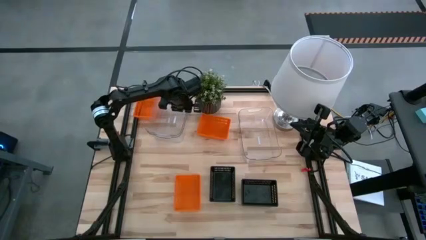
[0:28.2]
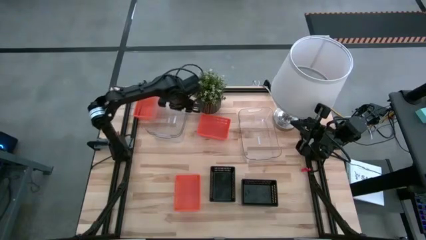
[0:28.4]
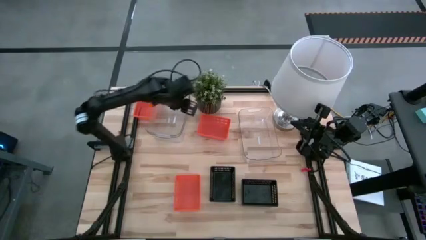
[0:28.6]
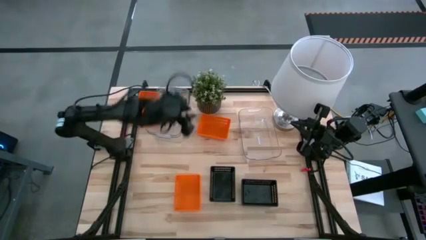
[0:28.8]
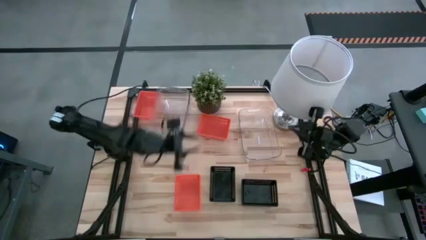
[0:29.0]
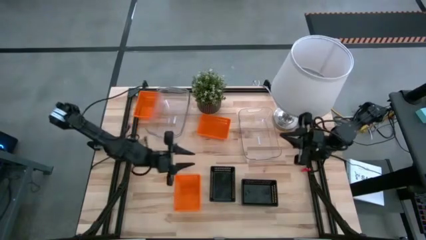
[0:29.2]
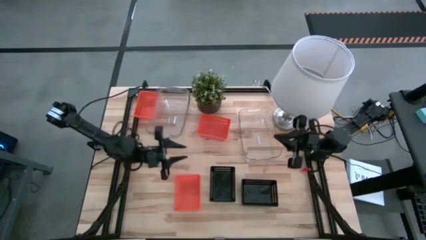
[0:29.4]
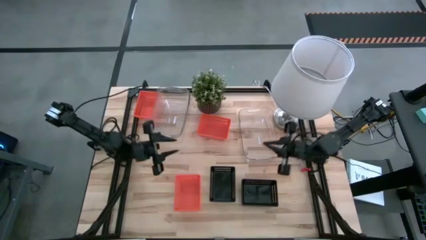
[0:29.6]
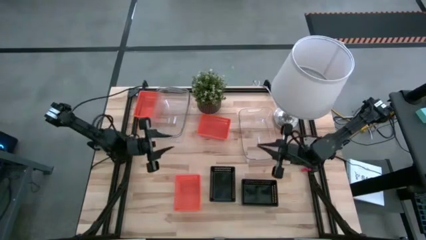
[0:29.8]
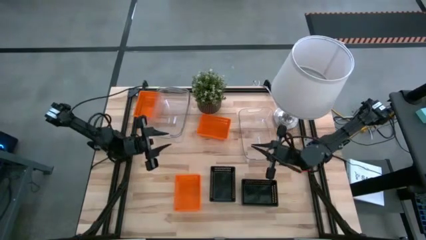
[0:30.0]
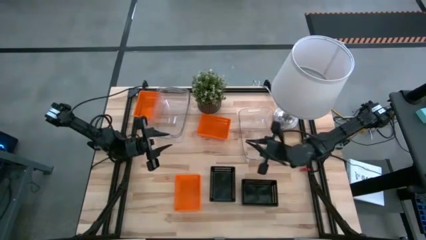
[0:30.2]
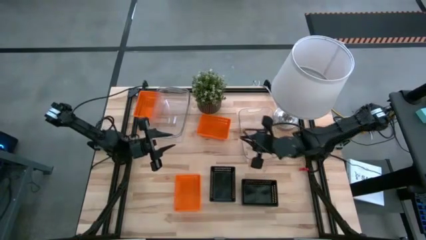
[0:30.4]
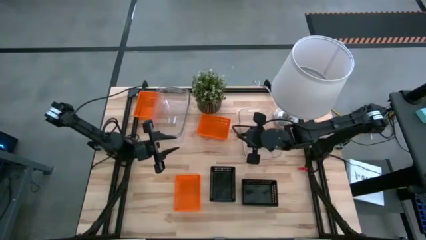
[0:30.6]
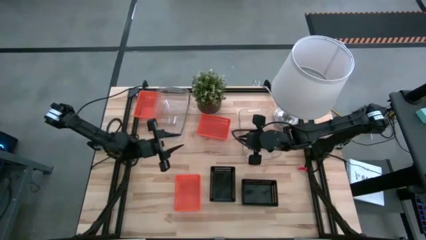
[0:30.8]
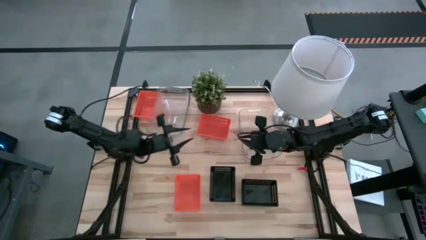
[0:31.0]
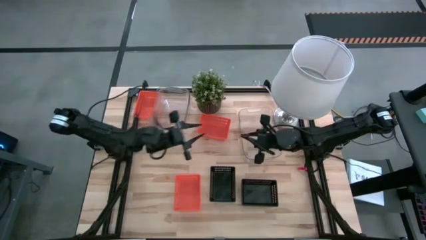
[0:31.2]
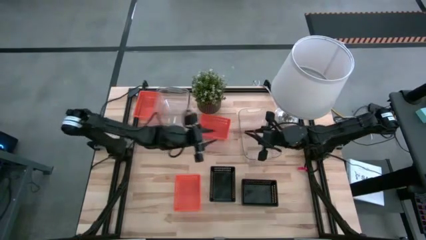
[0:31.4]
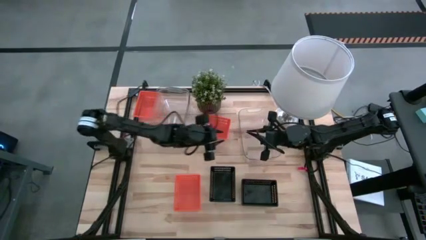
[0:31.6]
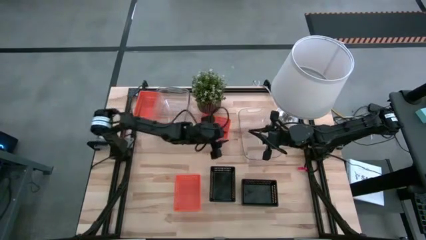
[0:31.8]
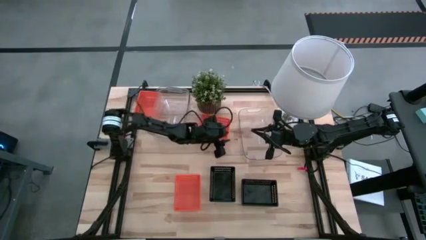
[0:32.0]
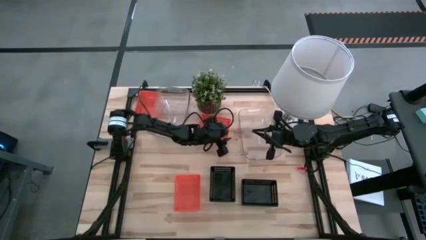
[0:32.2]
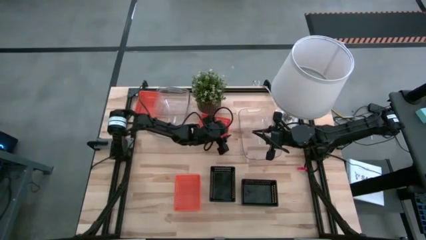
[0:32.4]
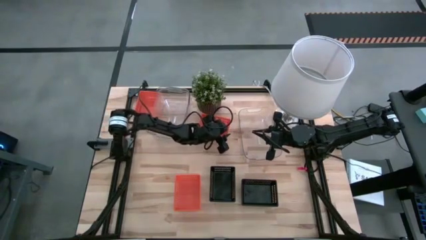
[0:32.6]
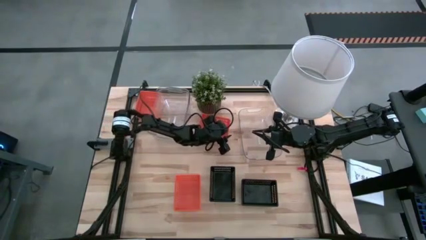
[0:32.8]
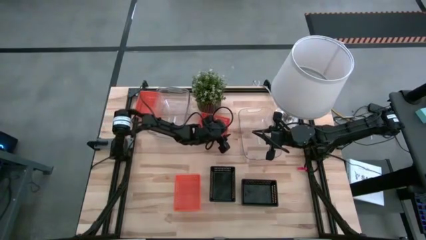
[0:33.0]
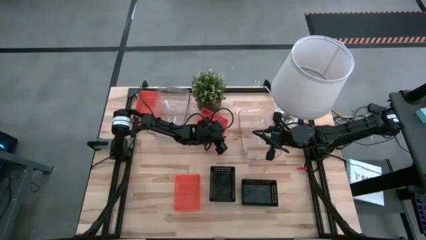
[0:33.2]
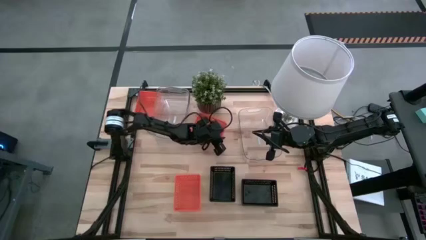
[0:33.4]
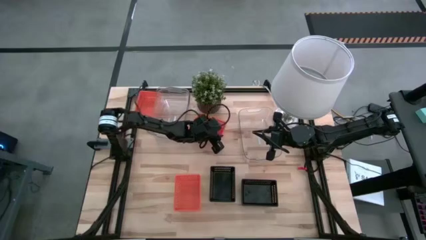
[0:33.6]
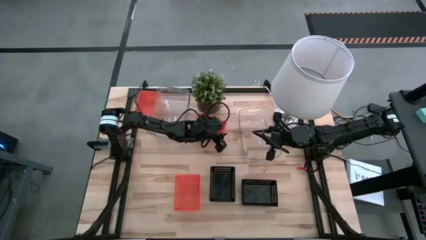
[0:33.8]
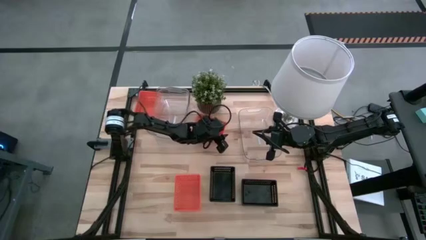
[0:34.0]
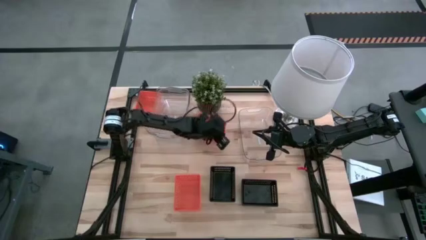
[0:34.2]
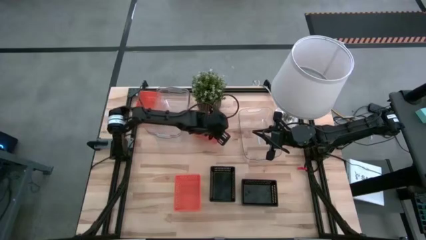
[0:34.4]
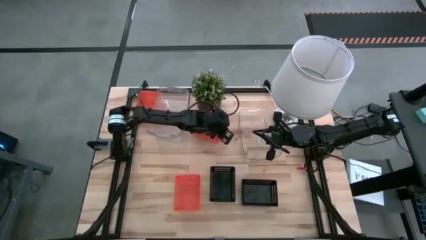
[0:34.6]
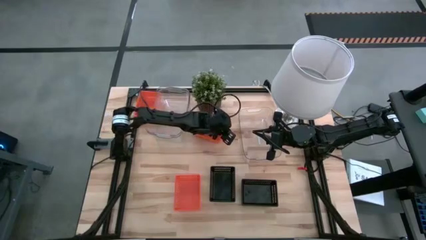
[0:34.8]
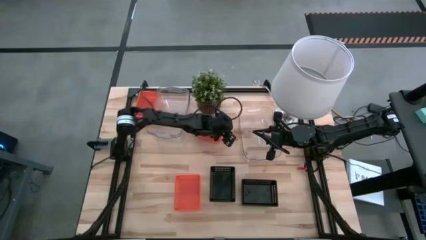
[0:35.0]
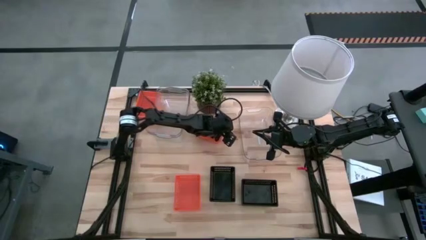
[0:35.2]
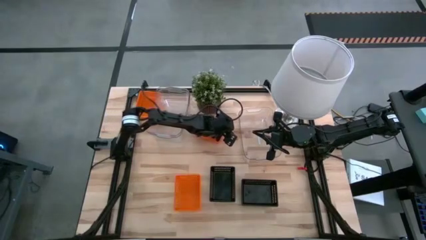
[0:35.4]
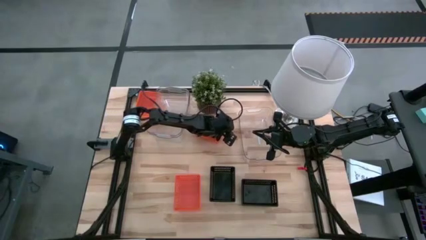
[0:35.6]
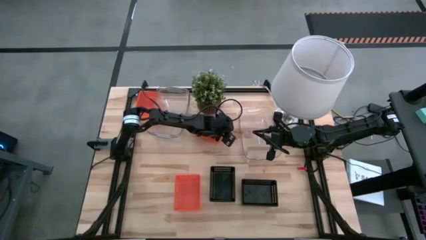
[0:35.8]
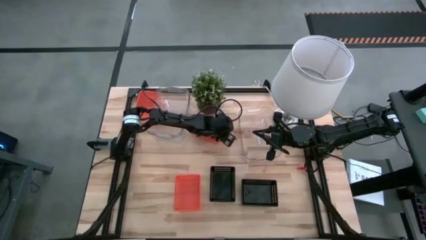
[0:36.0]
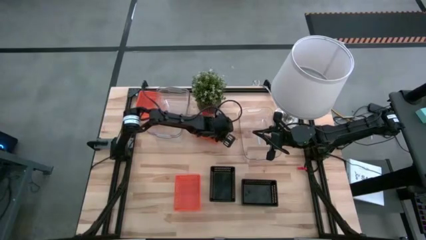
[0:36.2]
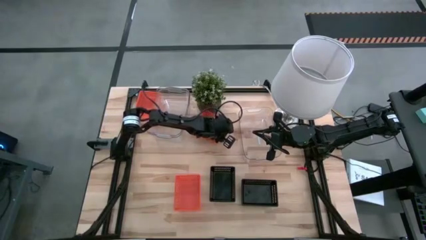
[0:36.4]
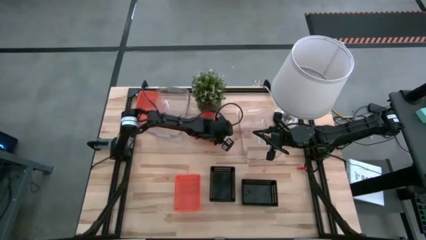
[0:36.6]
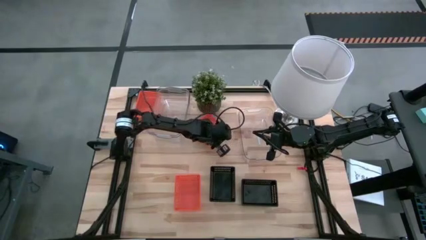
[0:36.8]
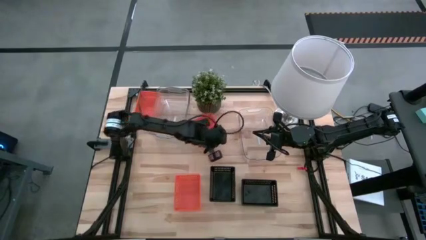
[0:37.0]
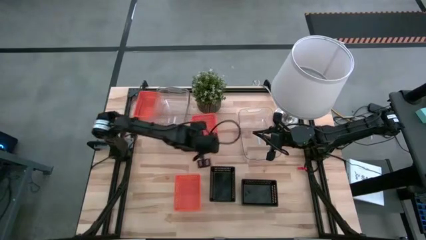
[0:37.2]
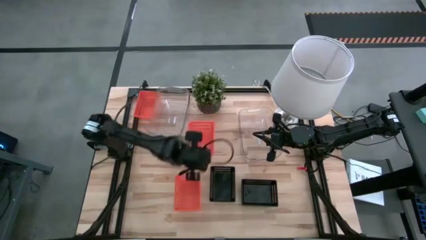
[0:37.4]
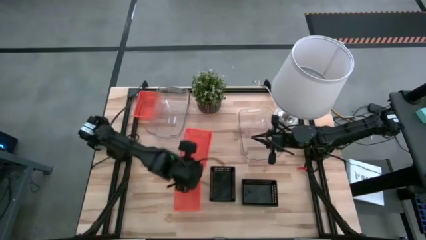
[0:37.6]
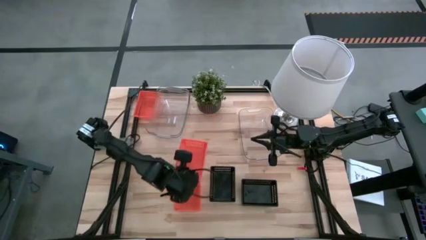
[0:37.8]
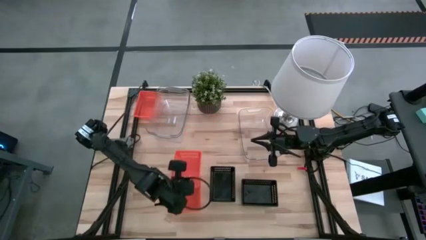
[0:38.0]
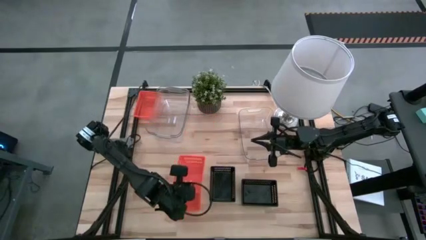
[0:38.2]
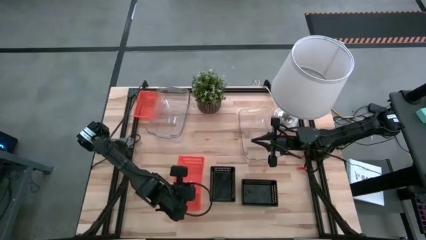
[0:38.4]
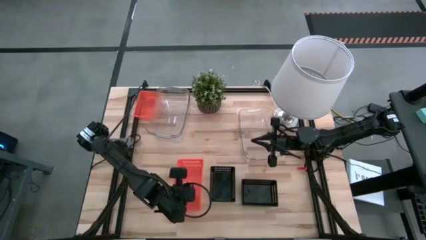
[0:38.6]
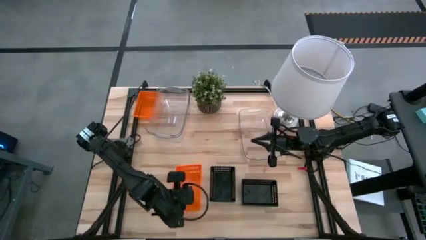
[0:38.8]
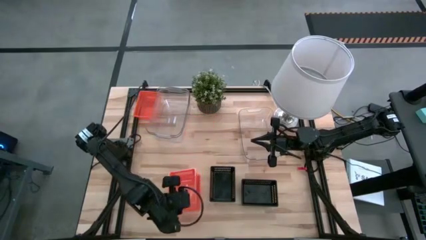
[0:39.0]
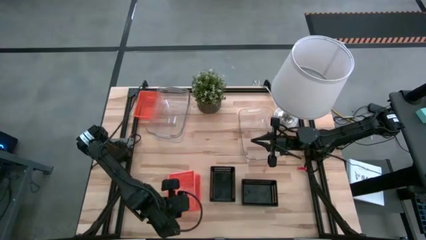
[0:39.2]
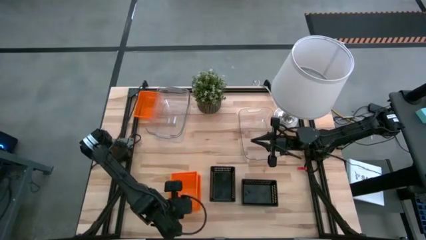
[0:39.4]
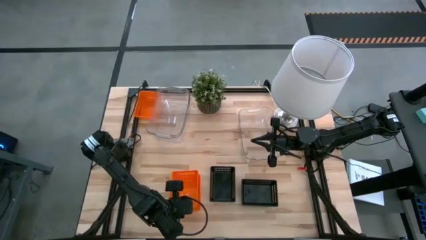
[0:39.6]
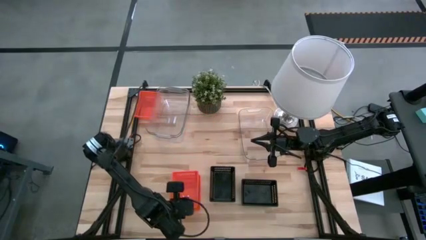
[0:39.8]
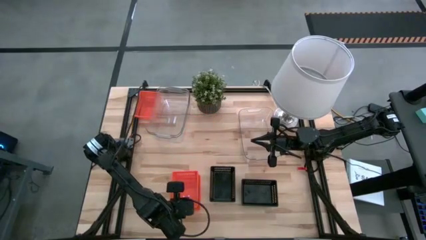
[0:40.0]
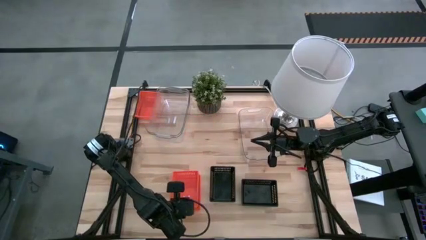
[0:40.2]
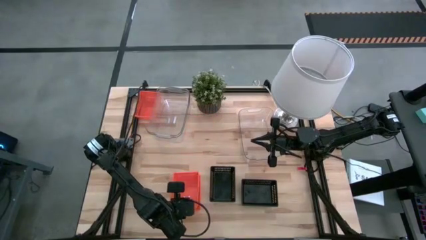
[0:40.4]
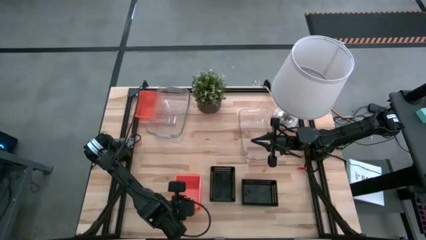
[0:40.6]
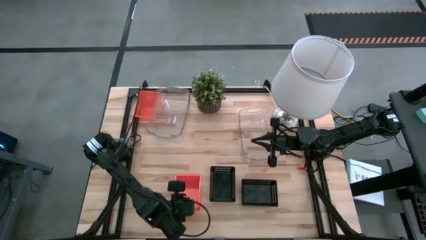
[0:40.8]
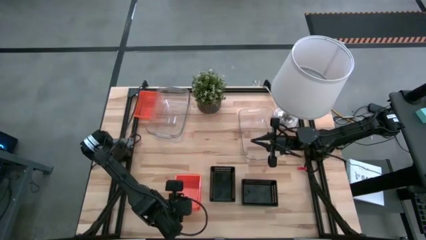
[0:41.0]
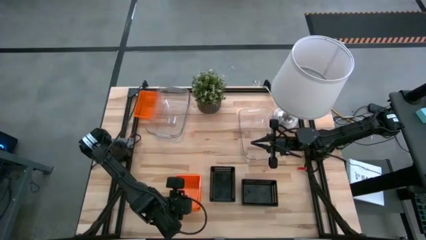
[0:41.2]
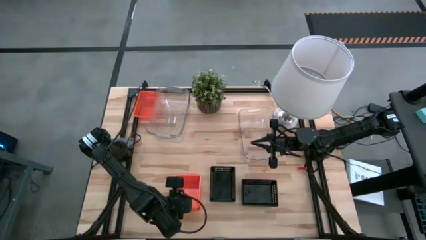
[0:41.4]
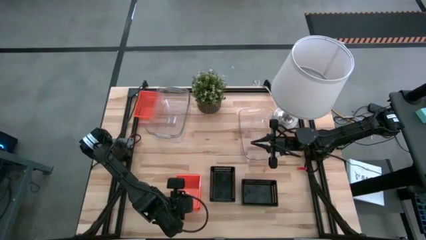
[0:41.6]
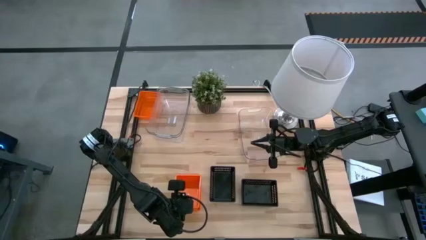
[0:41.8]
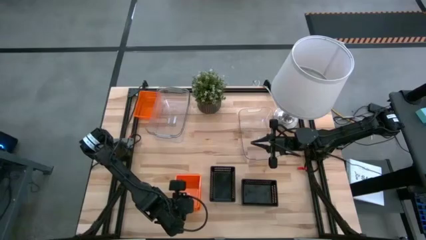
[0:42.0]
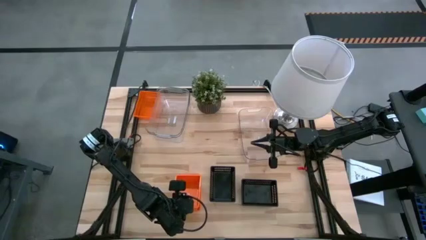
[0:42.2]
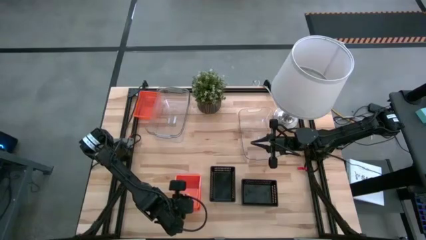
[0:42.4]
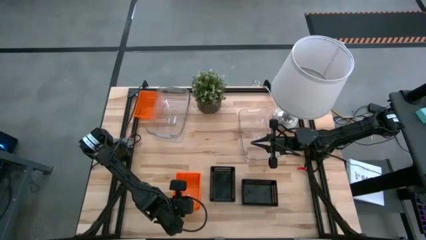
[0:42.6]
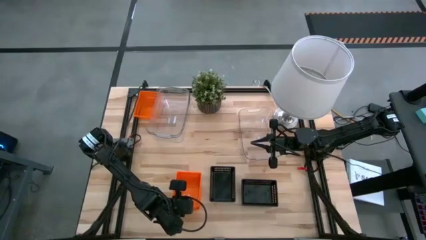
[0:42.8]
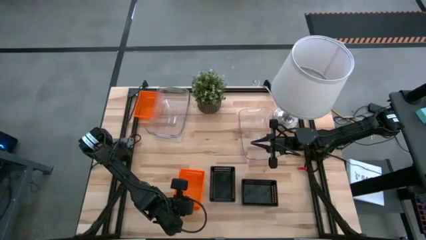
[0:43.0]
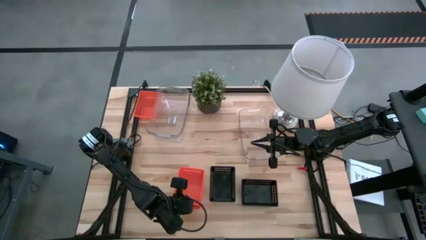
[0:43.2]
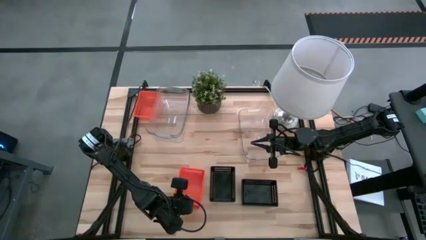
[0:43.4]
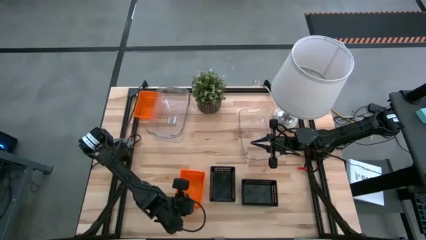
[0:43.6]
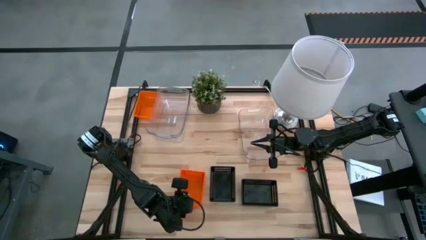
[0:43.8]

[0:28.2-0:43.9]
Stack the middle orange bin on the bottom orange bin
